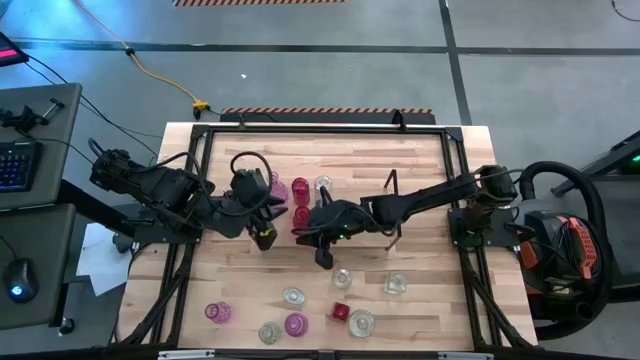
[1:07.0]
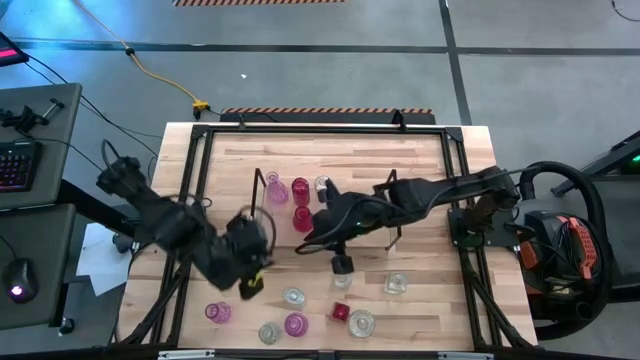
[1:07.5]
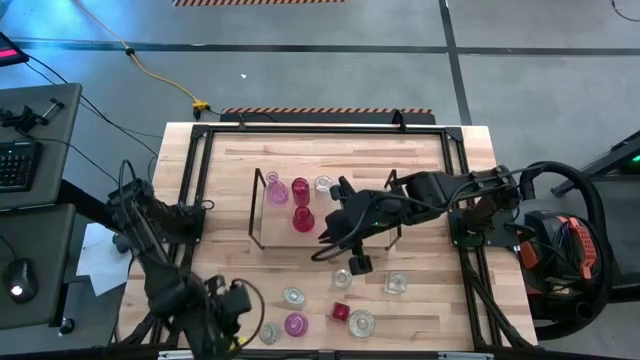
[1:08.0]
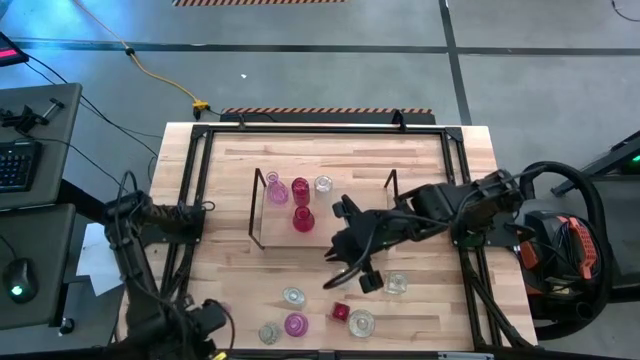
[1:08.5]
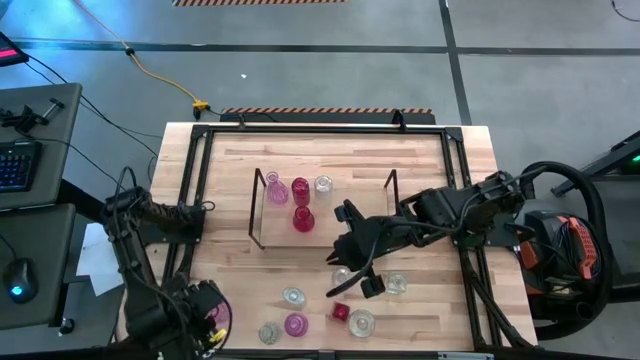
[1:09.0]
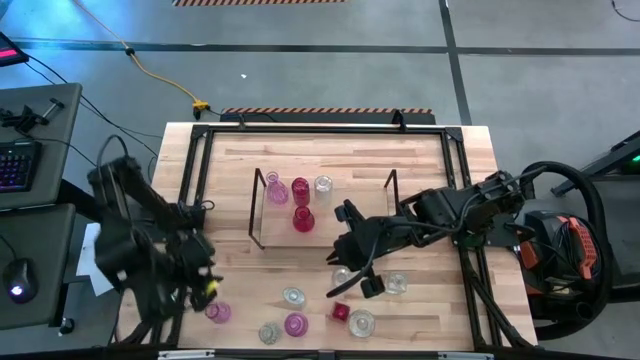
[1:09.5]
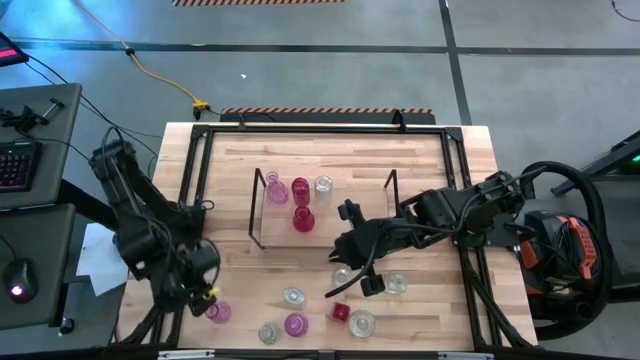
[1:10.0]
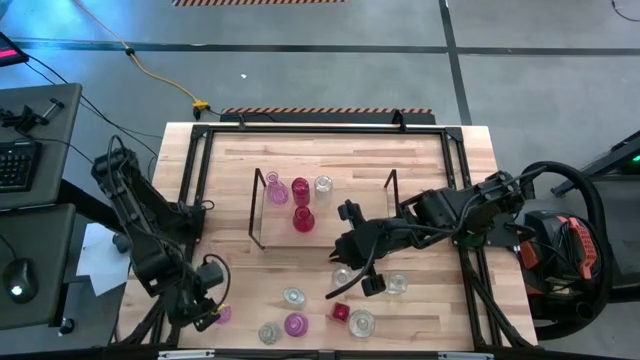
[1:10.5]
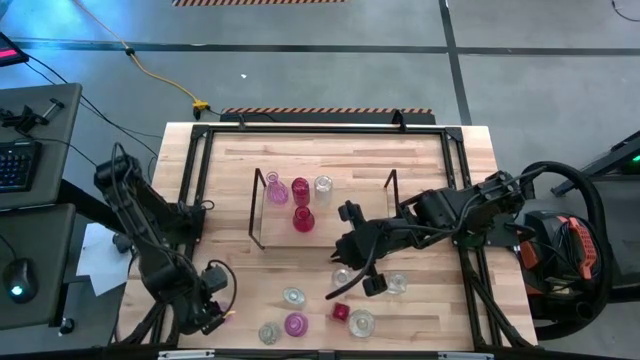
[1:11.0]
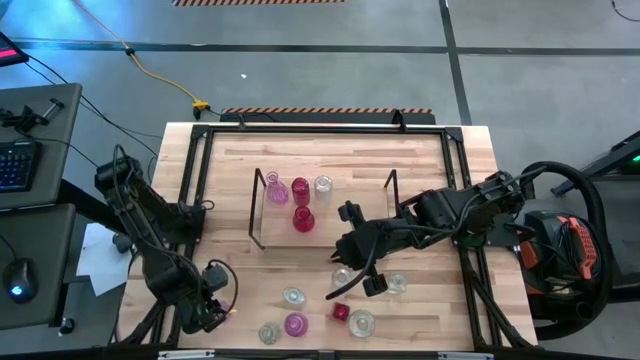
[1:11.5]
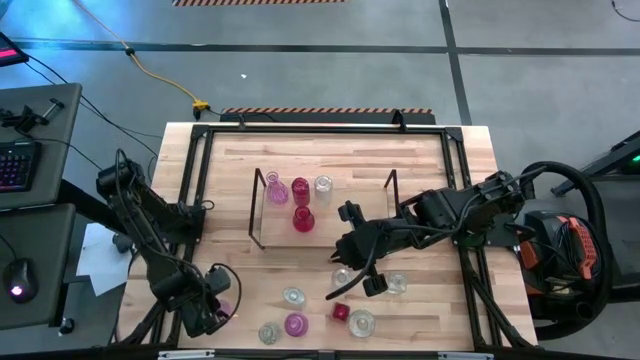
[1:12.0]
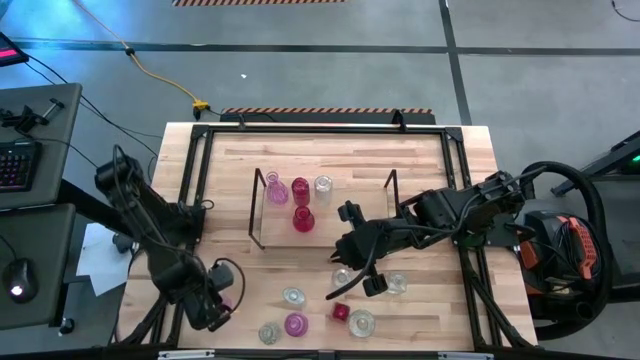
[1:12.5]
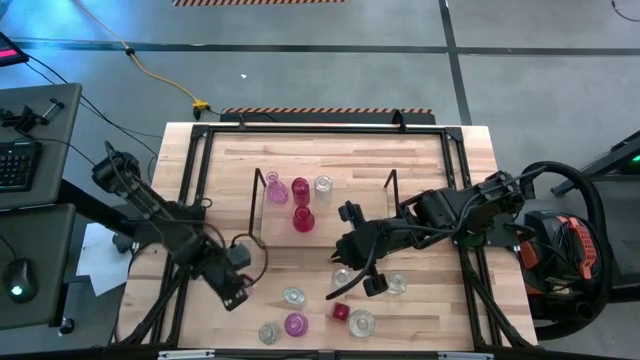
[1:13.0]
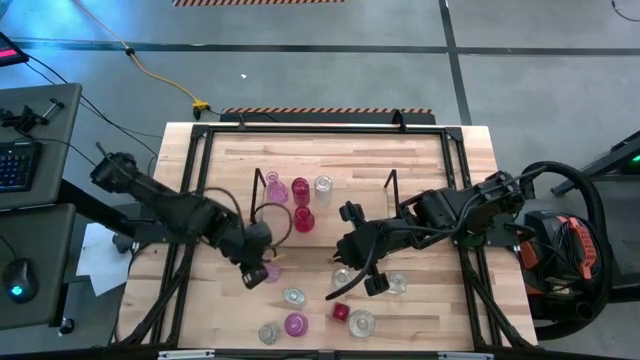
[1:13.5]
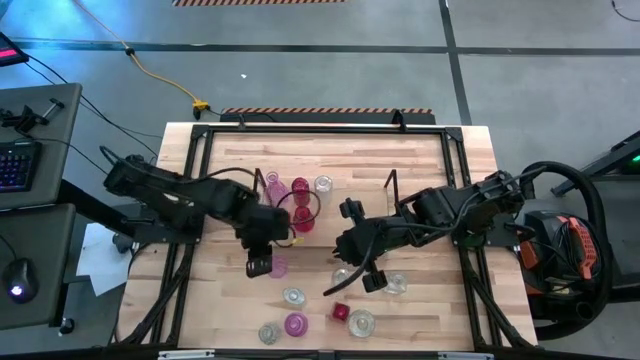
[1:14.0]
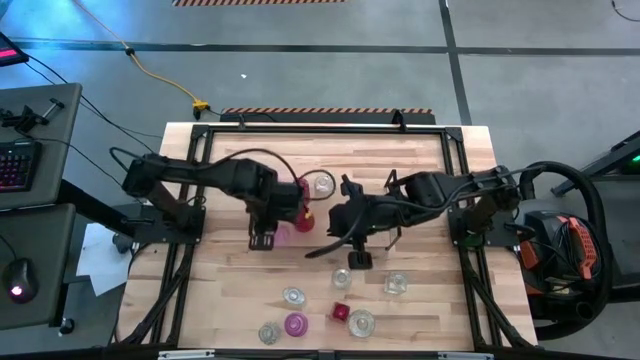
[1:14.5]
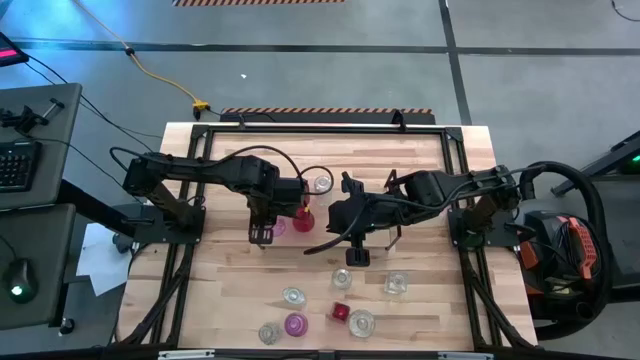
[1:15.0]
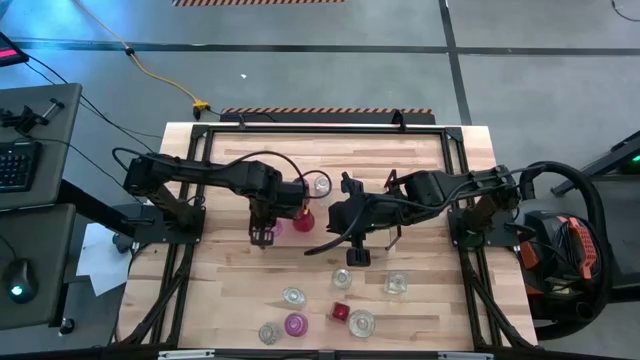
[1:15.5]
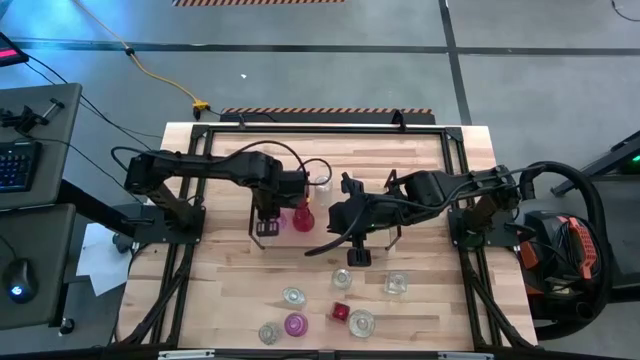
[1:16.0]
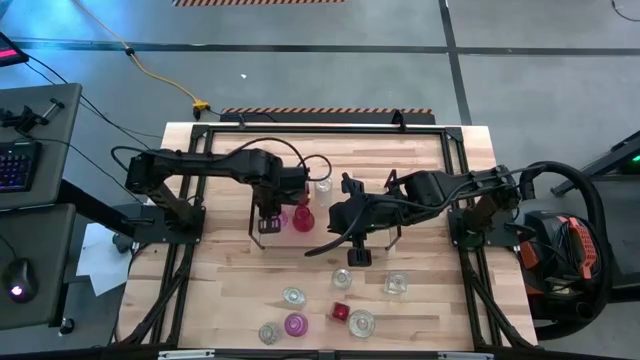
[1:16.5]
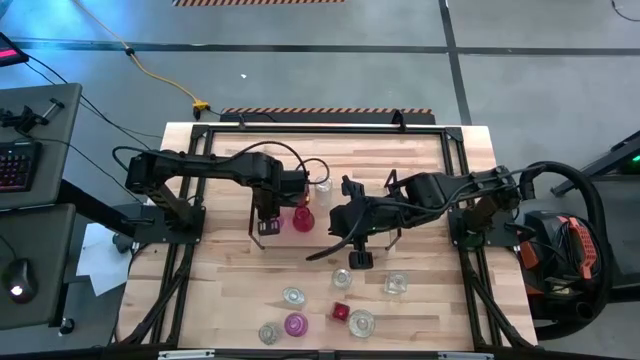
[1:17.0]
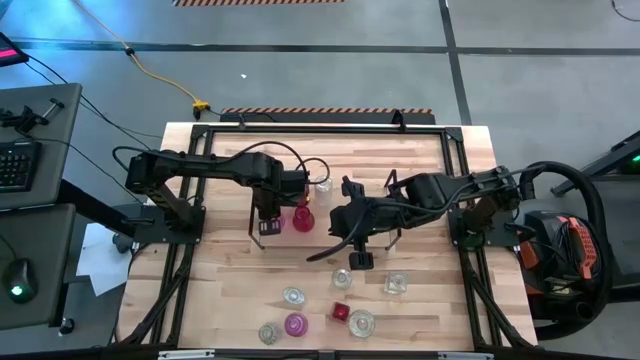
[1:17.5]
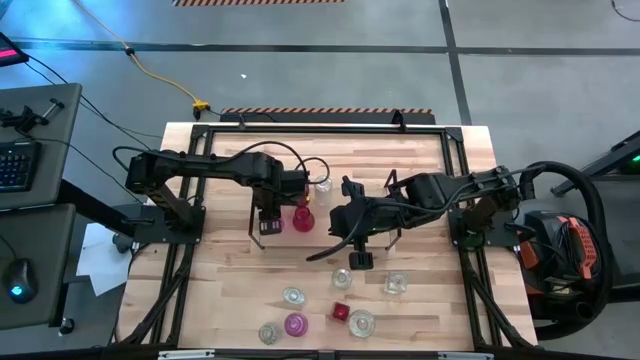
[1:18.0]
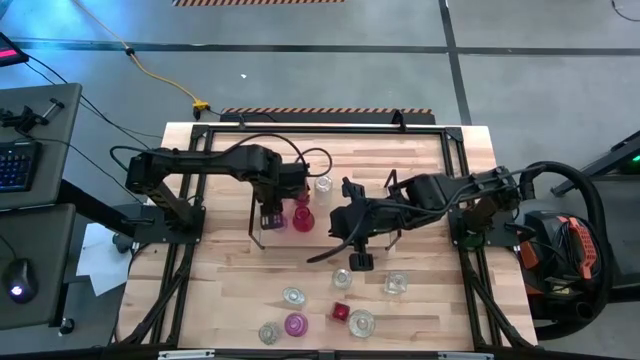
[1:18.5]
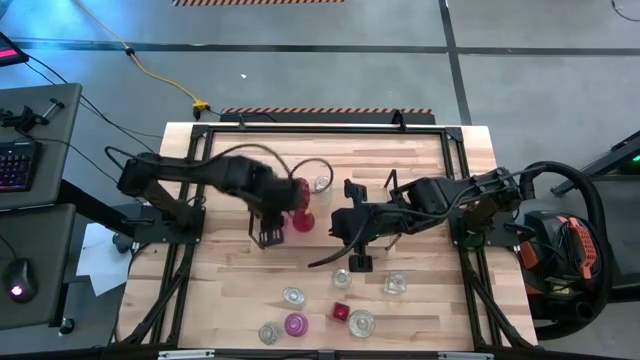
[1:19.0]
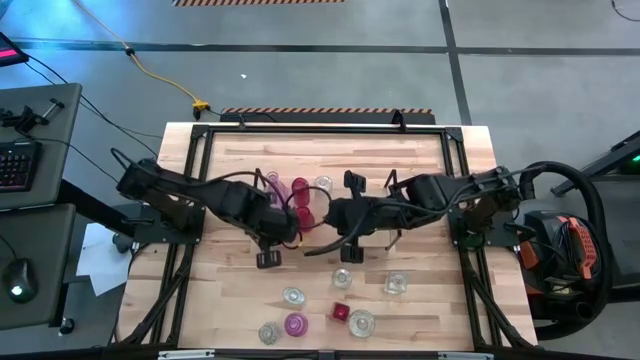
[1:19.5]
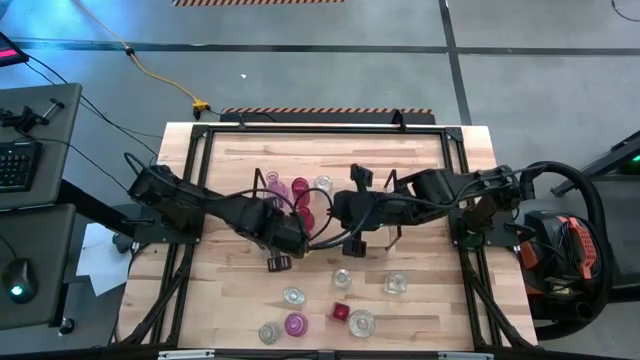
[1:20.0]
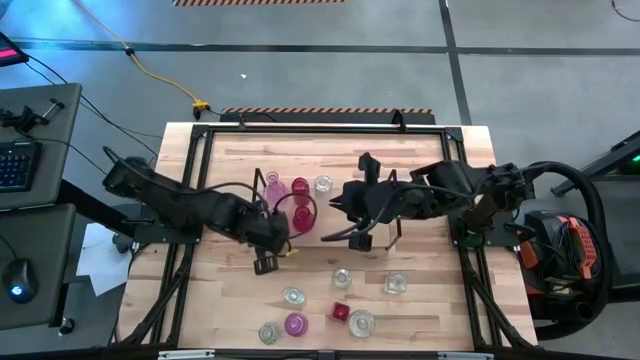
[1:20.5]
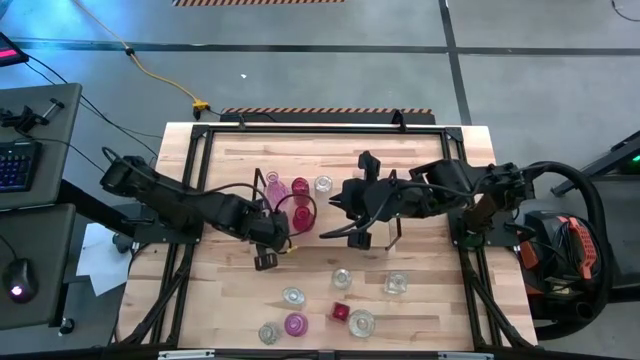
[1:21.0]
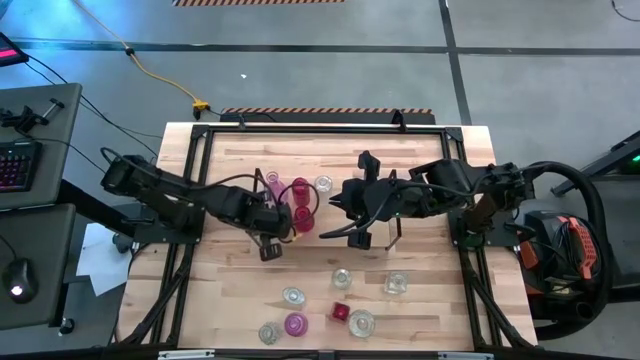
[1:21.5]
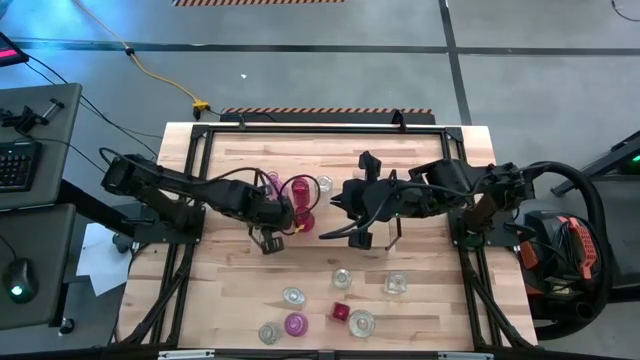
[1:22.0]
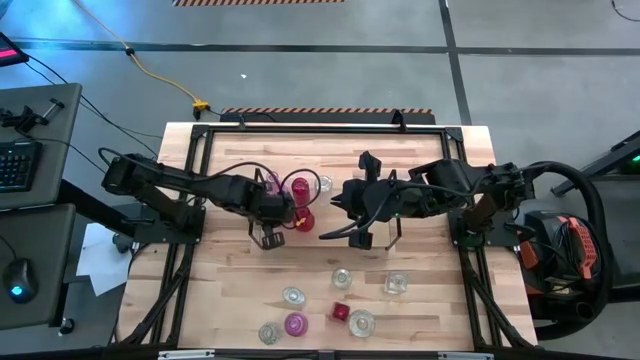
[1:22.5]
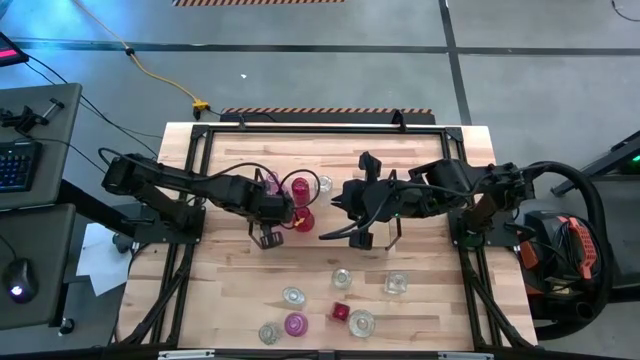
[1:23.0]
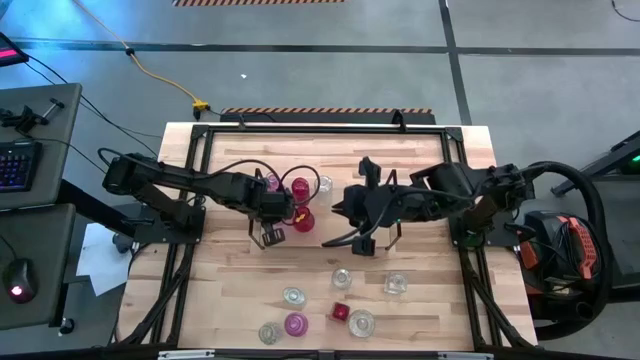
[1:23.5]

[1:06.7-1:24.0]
Task: sort vases onto shelf
Put the pink vase aligned with the other pink vase on the shelf

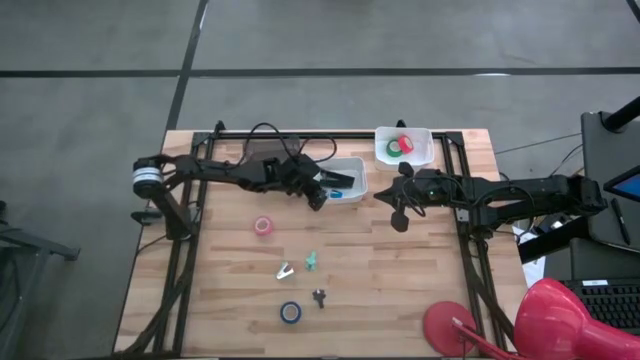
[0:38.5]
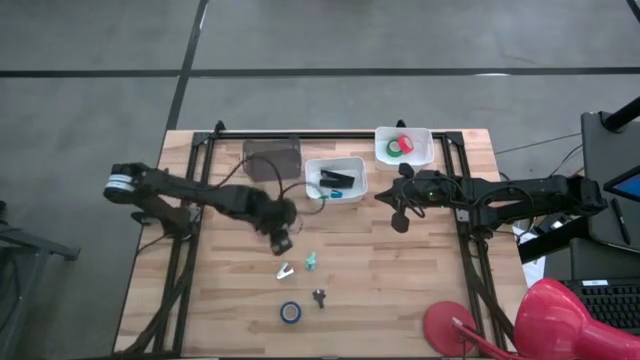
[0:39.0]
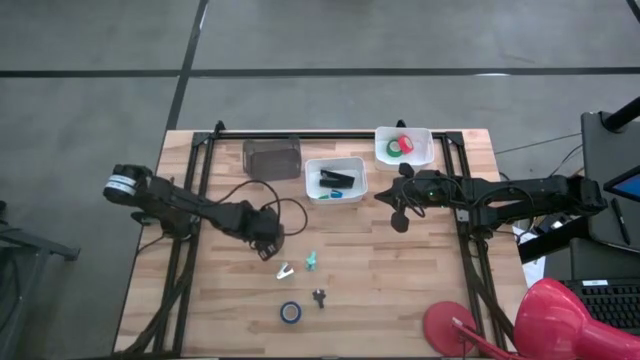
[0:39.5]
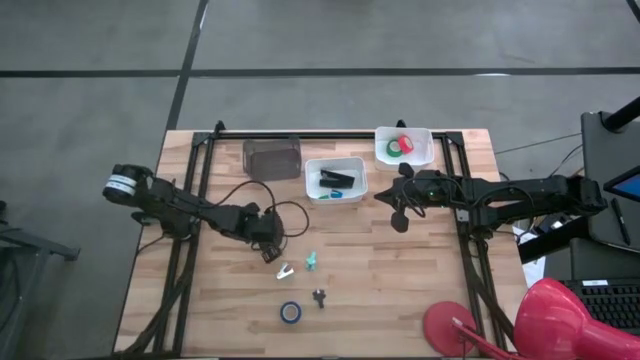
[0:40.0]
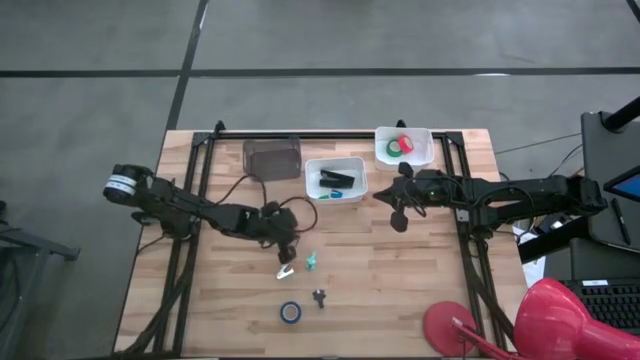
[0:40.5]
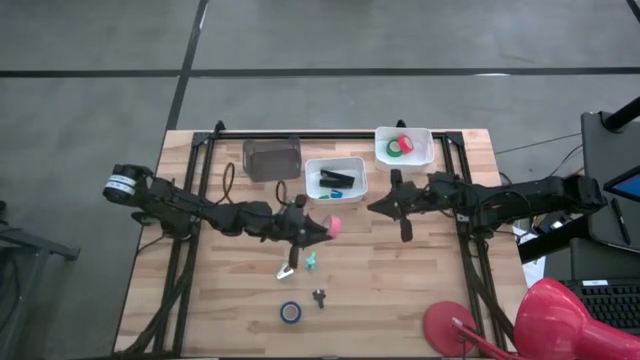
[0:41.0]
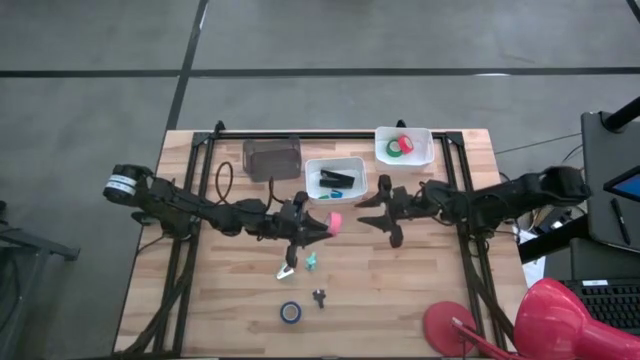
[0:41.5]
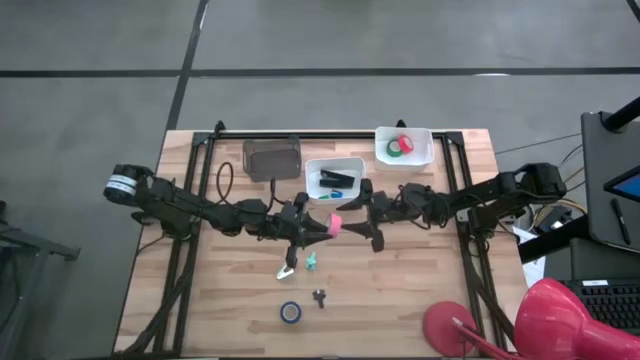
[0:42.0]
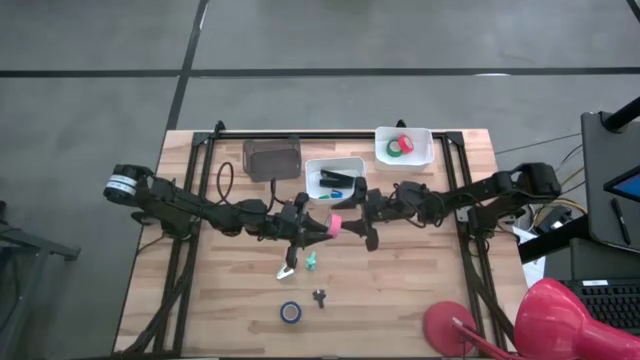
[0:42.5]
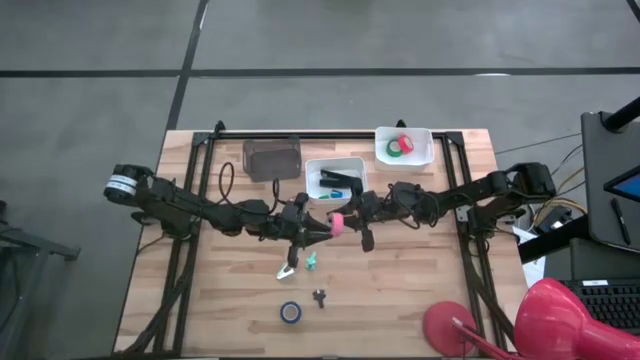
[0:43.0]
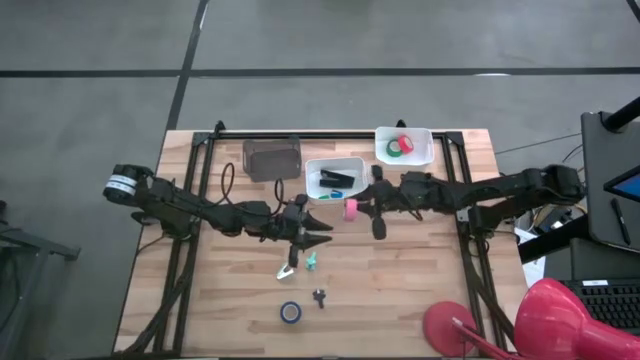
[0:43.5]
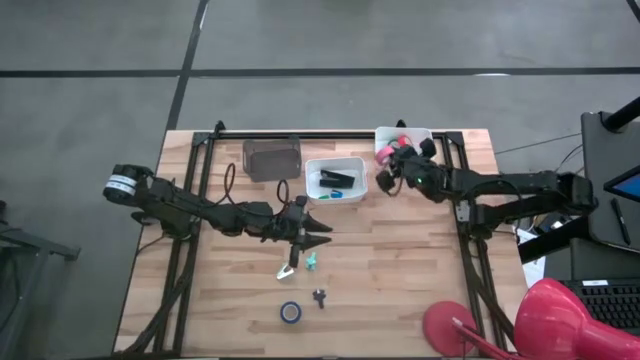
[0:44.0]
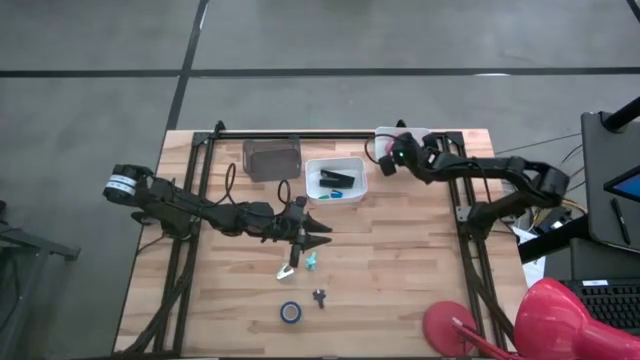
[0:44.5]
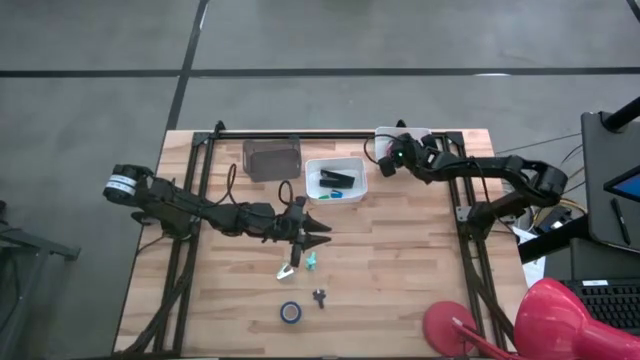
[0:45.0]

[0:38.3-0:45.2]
Task: Pick and place Stapler, Stapler remover, tape
Put the pink tape into the right white bin
